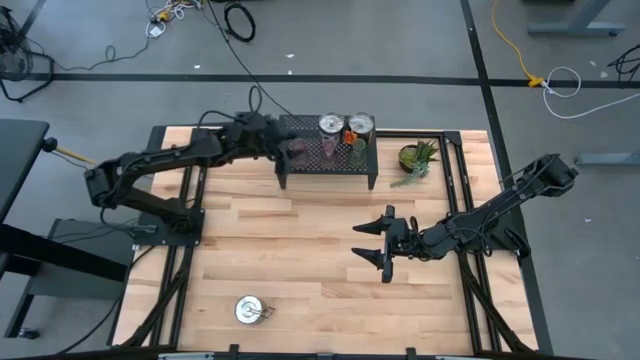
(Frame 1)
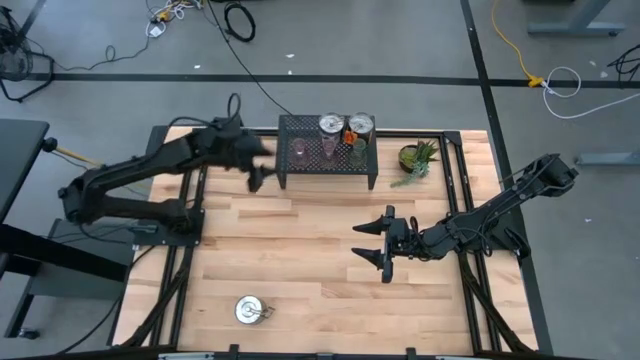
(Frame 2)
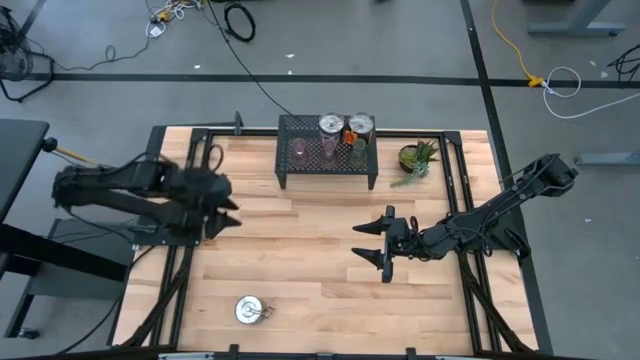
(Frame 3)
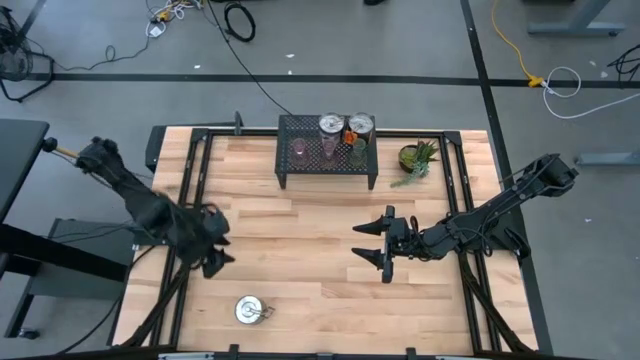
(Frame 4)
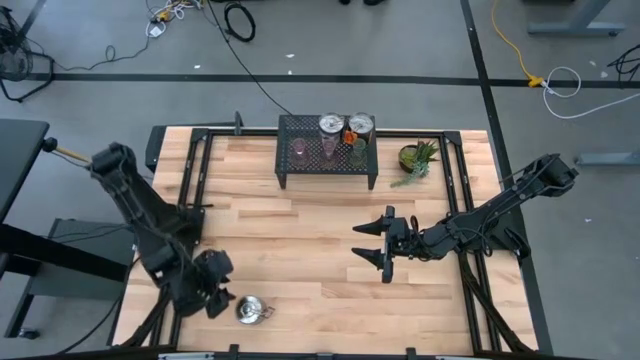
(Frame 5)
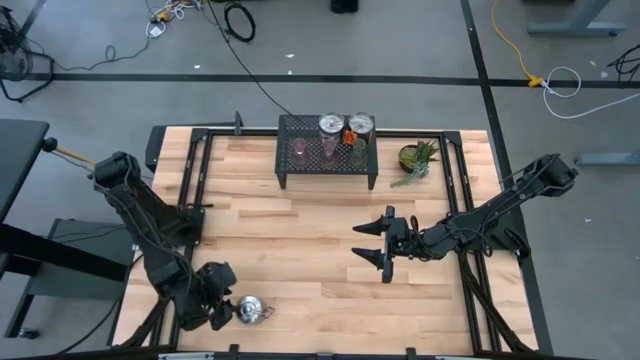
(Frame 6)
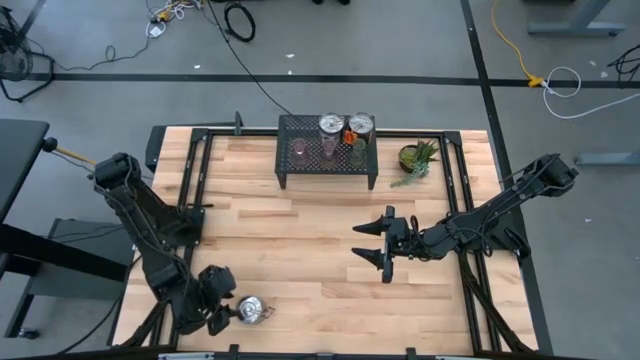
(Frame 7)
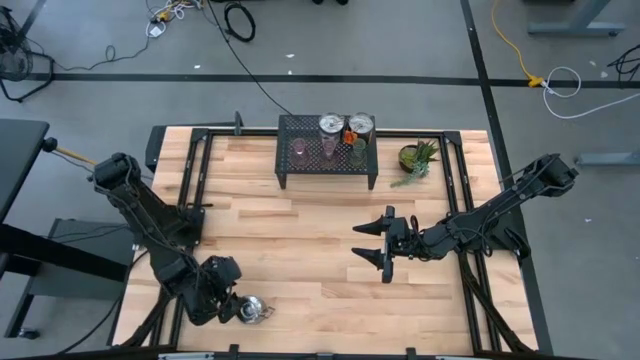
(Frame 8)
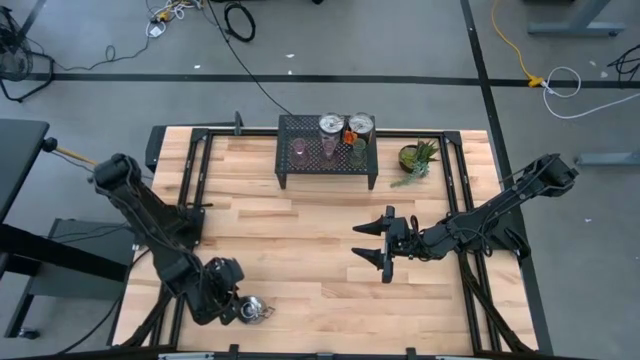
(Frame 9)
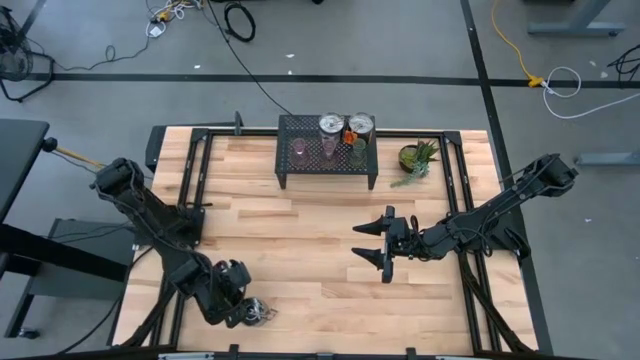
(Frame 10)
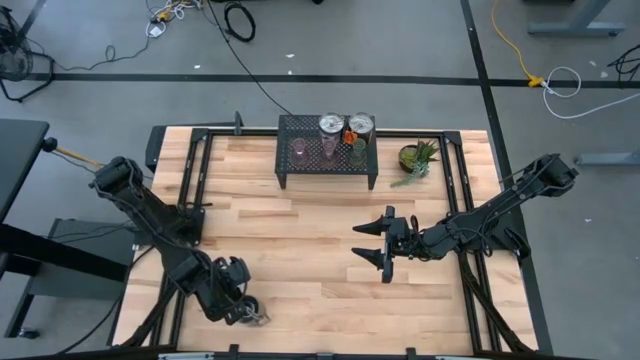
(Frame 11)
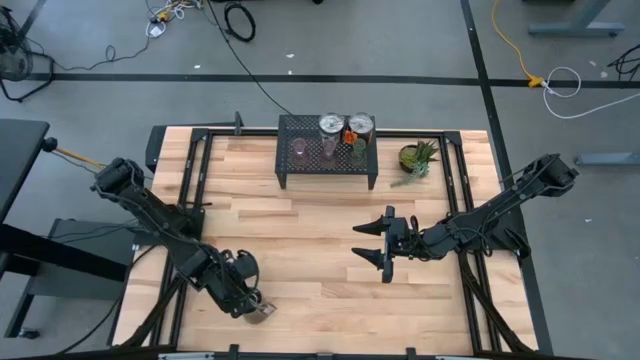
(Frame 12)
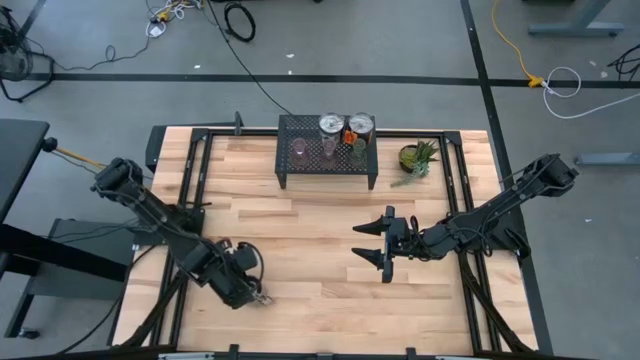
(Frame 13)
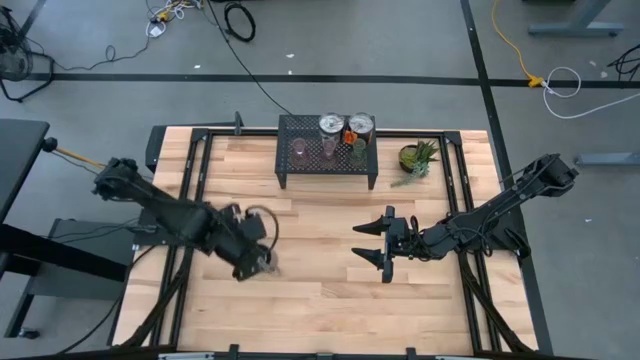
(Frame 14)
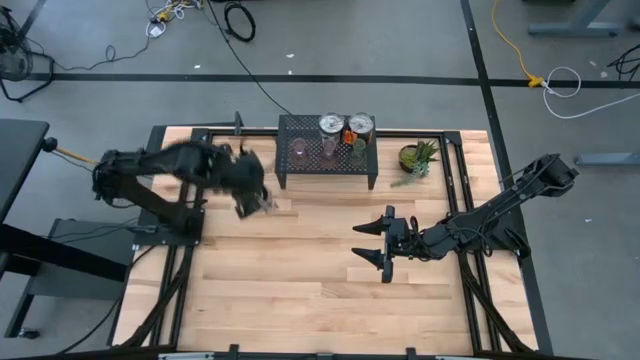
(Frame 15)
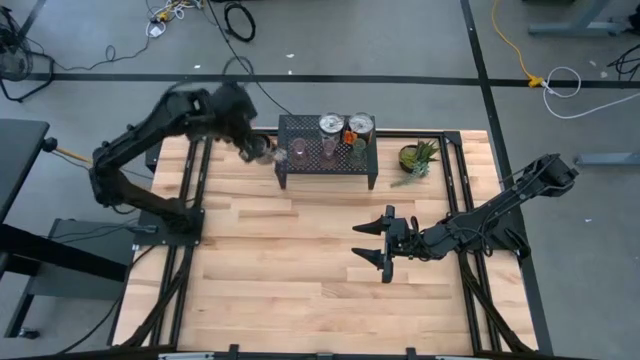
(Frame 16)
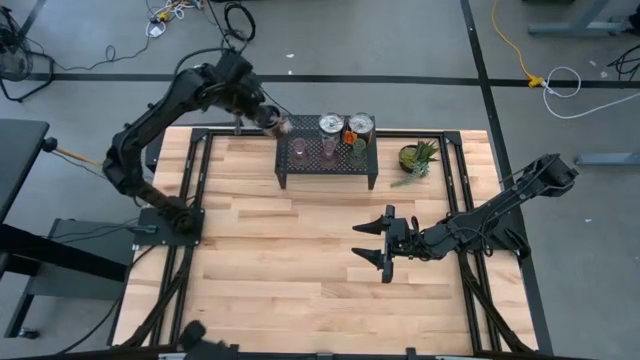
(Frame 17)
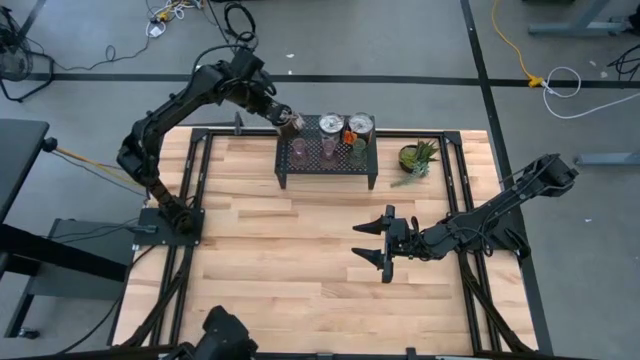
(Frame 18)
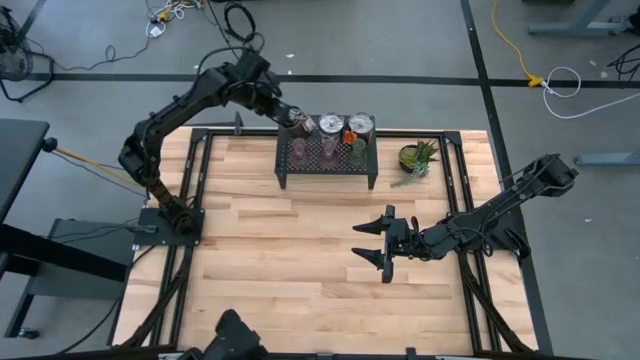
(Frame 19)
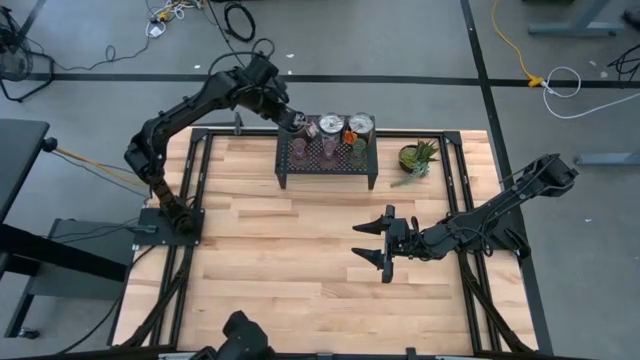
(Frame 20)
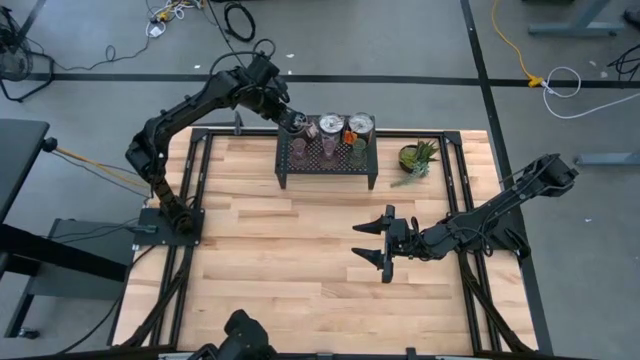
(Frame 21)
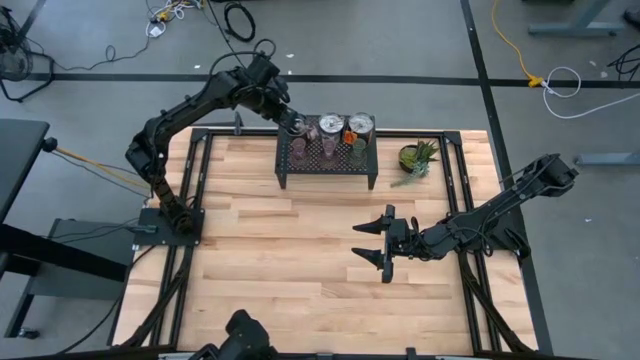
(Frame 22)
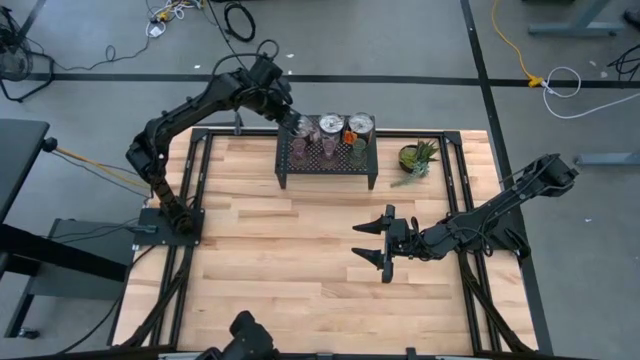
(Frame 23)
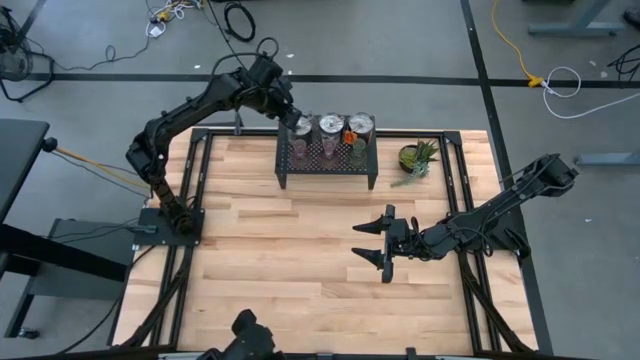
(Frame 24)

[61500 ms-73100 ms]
Task: Pick & Place candle stick holders
Put the scented candle on the shelf aligned with the other silver scented candles

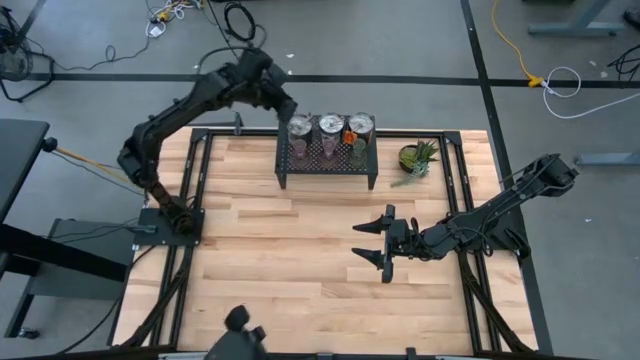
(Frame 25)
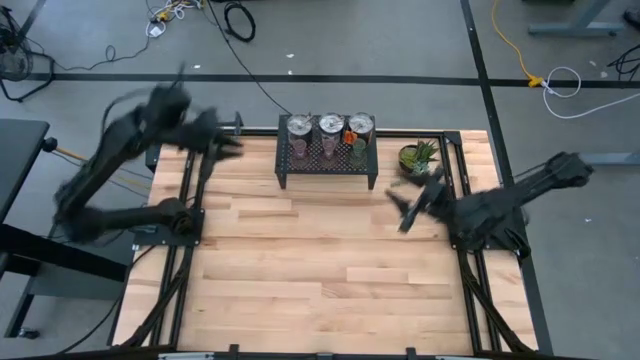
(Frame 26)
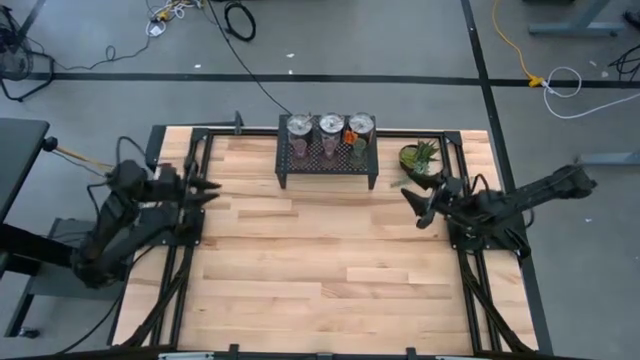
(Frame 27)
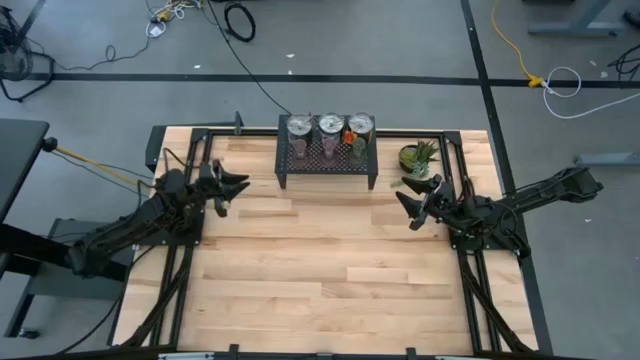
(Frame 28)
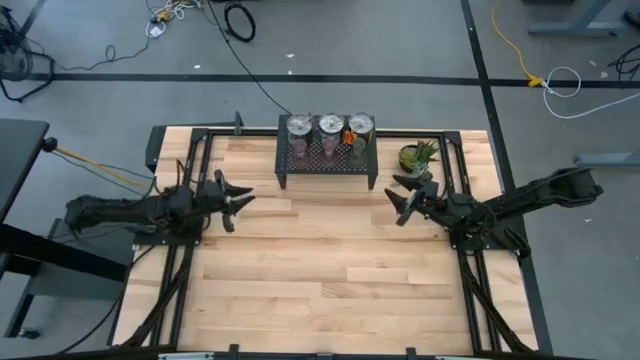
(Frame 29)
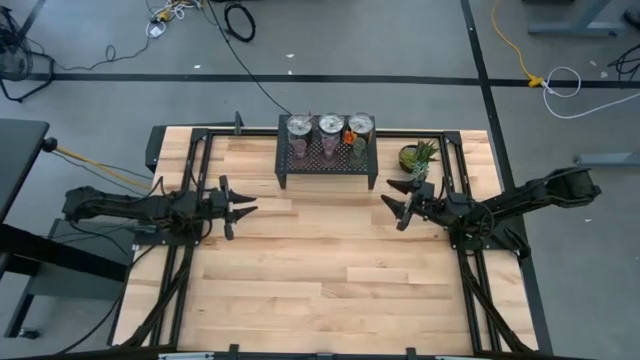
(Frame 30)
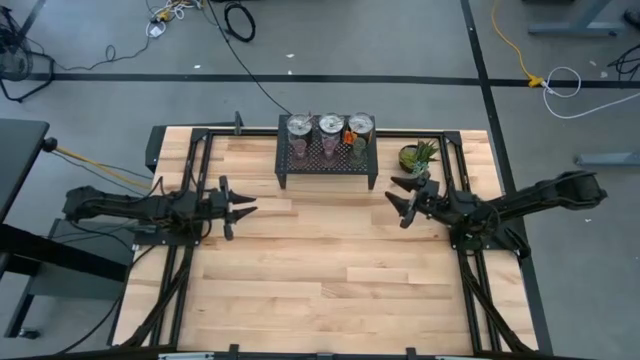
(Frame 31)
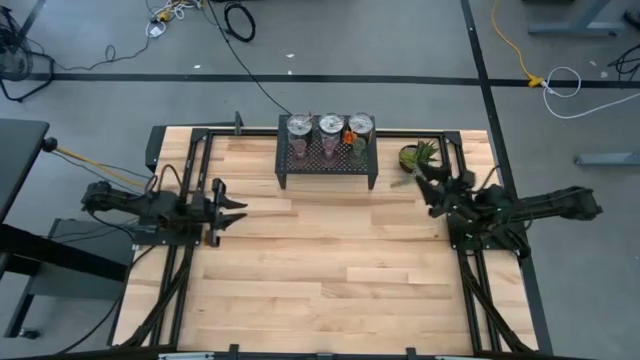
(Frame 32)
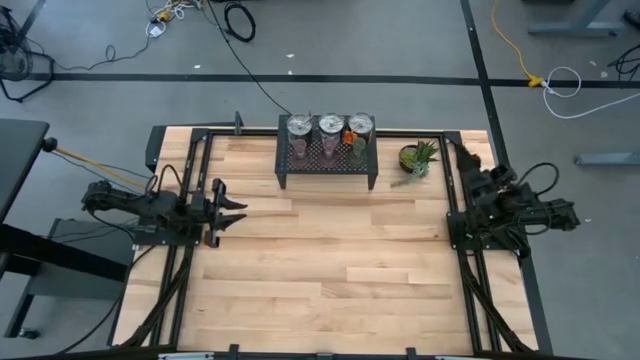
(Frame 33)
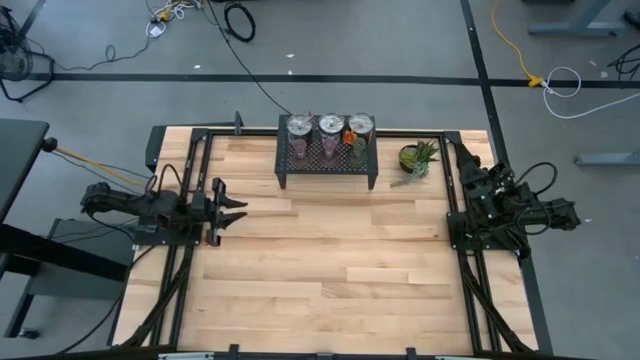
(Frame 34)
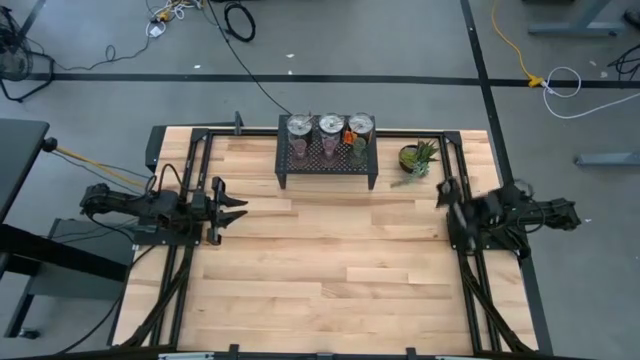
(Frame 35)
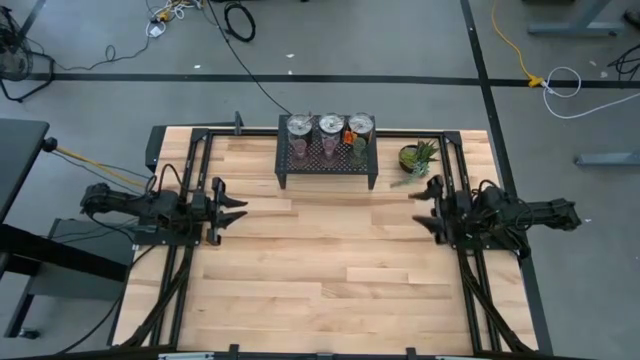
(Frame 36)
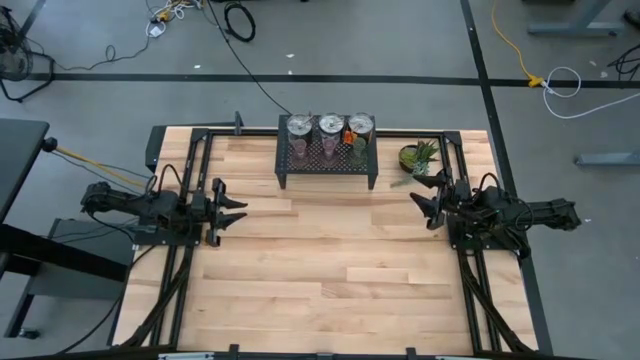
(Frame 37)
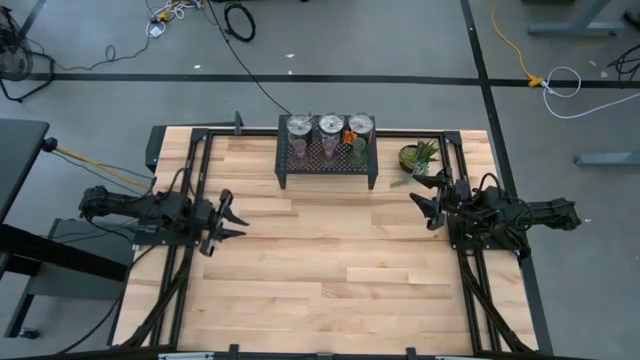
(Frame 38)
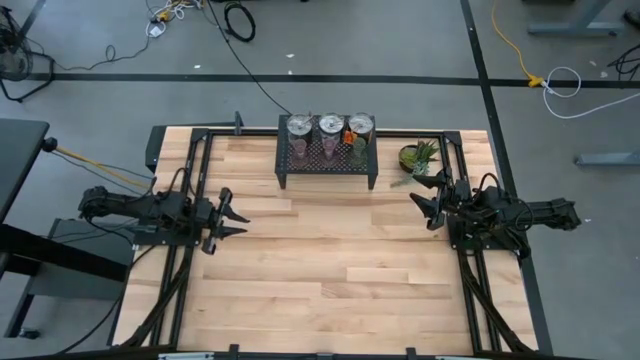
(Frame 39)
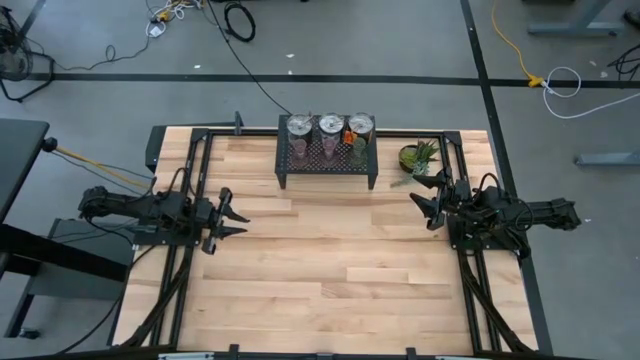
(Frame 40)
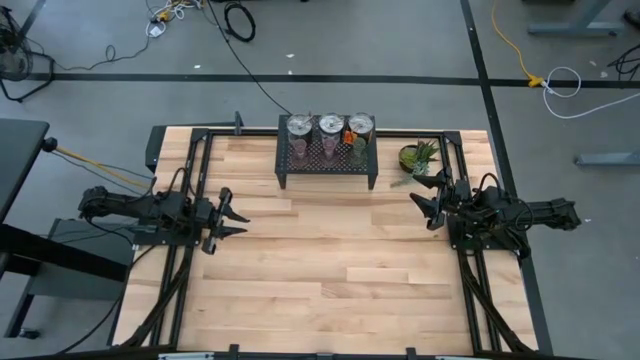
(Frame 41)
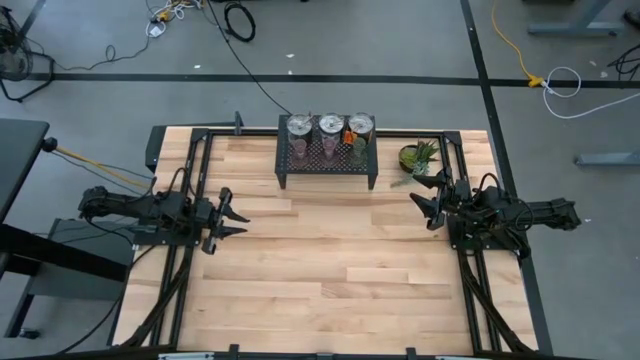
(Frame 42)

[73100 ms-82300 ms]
Return to Home Position

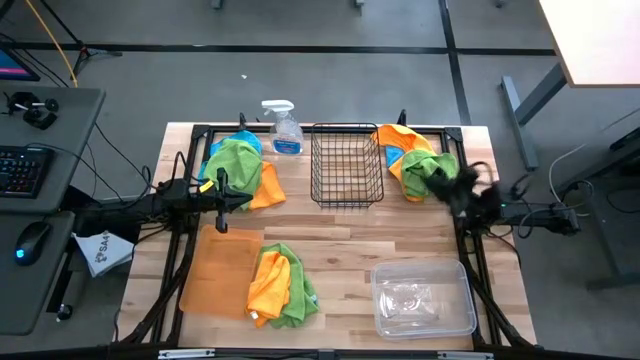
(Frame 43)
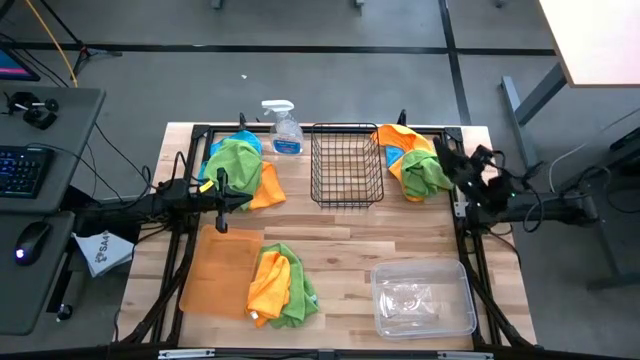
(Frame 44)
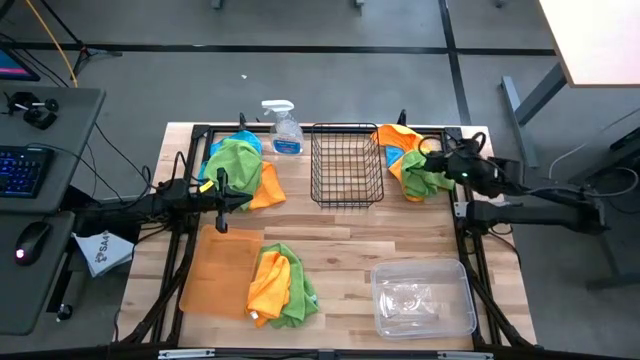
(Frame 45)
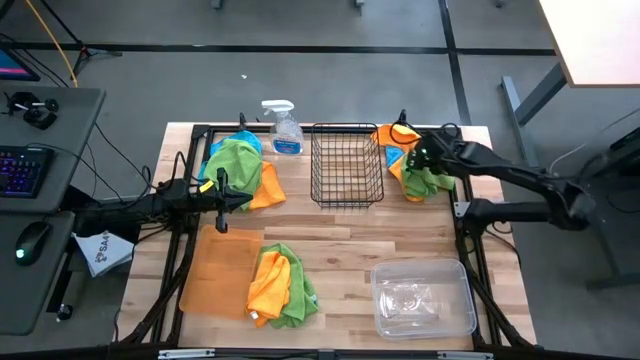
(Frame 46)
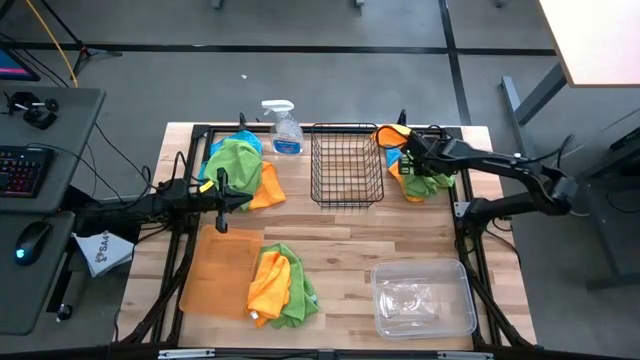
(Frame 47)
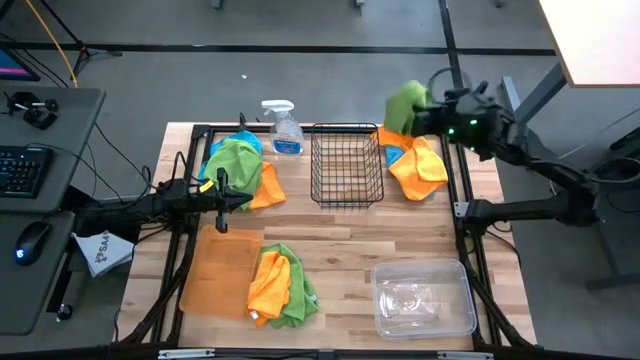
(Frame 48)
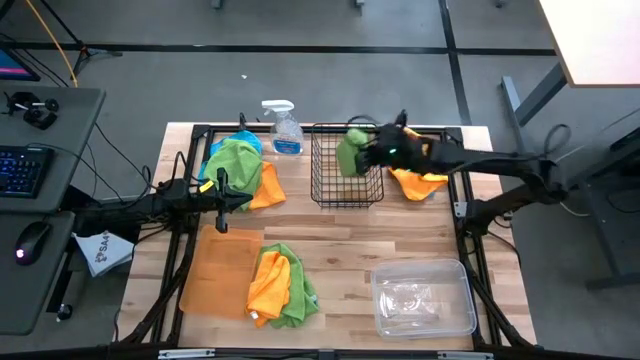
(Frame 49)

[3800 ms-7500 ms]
Task: Sort microfiber towel by color & place in baskets
Put the top right green microfiber cloth into the mesh basket
